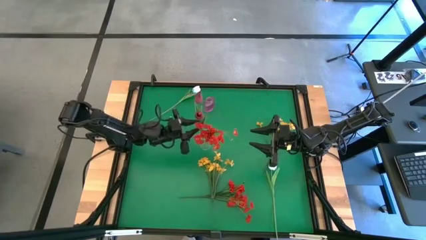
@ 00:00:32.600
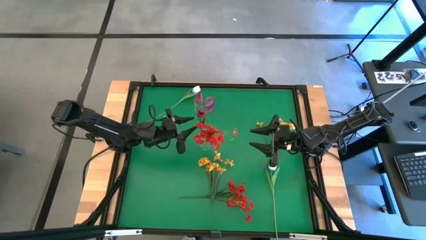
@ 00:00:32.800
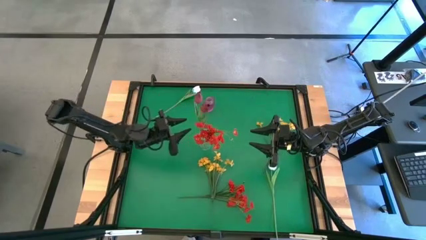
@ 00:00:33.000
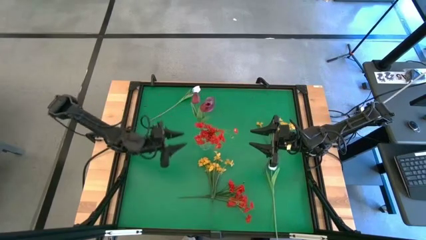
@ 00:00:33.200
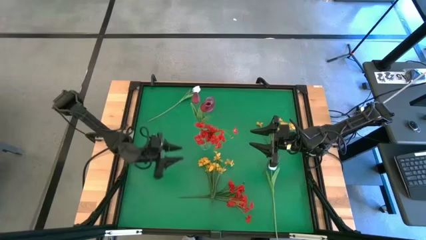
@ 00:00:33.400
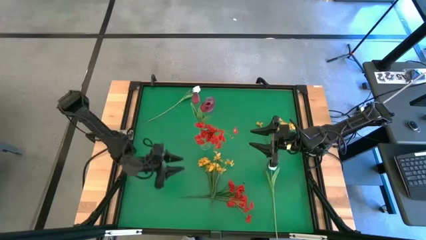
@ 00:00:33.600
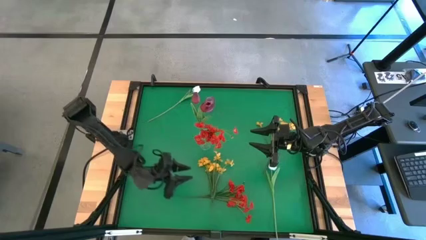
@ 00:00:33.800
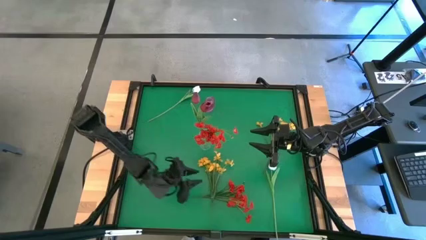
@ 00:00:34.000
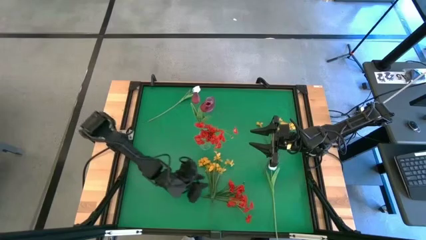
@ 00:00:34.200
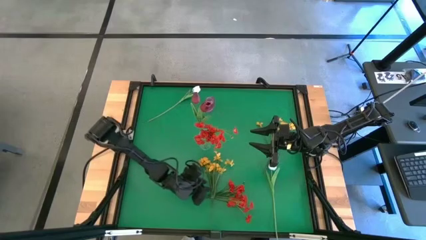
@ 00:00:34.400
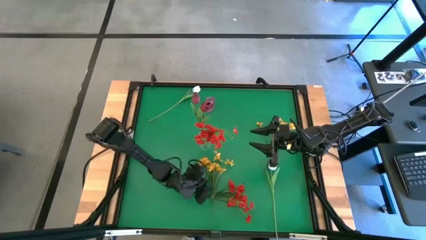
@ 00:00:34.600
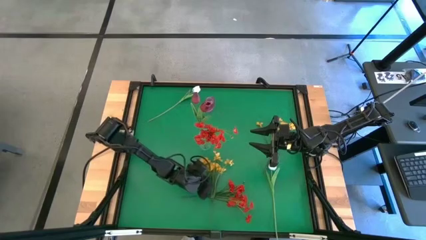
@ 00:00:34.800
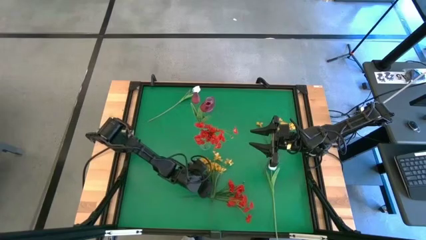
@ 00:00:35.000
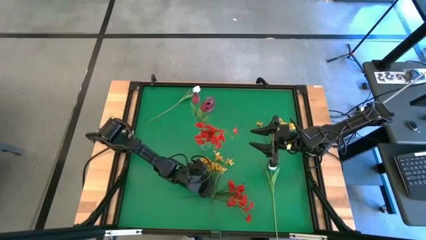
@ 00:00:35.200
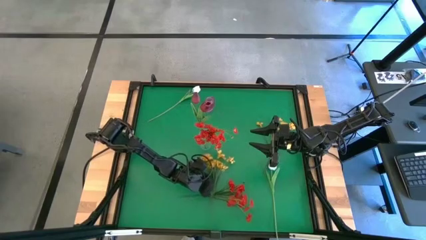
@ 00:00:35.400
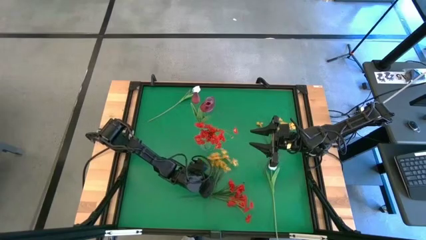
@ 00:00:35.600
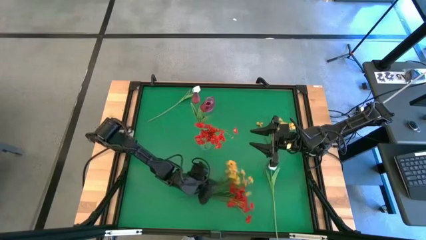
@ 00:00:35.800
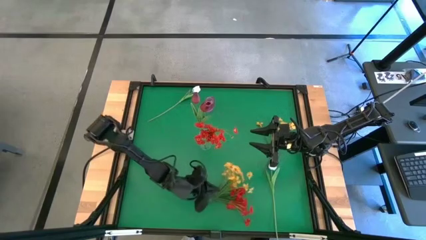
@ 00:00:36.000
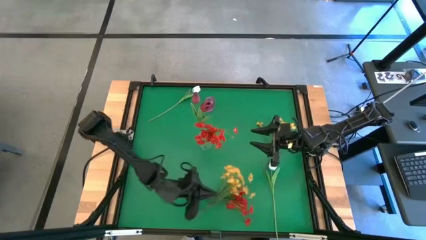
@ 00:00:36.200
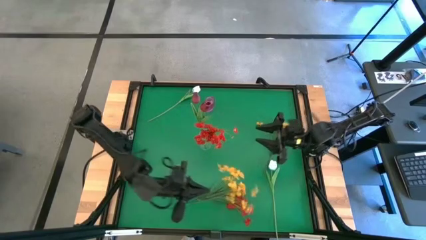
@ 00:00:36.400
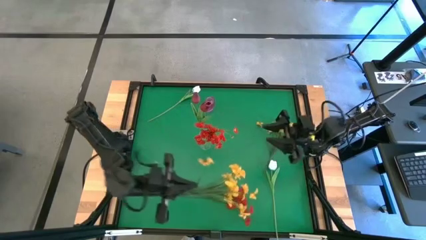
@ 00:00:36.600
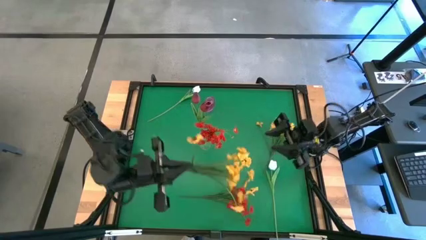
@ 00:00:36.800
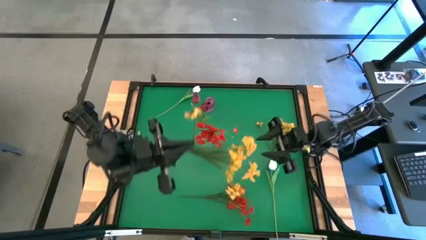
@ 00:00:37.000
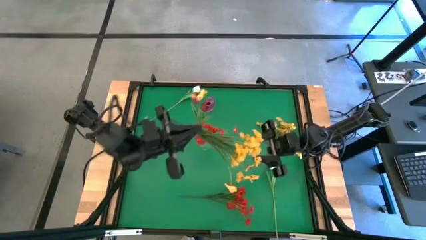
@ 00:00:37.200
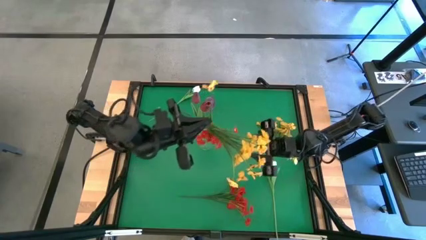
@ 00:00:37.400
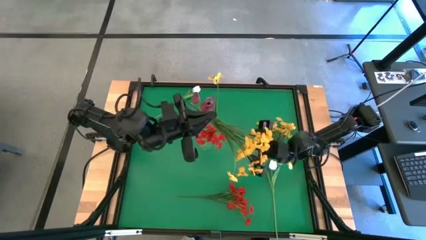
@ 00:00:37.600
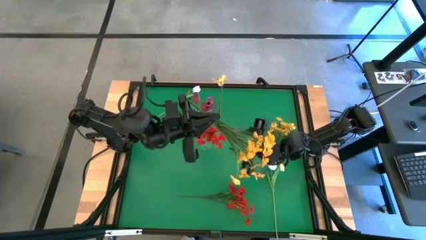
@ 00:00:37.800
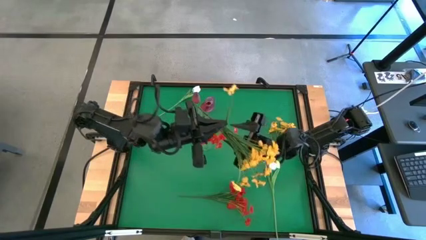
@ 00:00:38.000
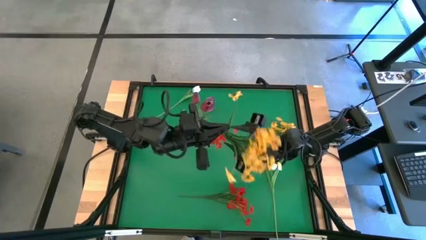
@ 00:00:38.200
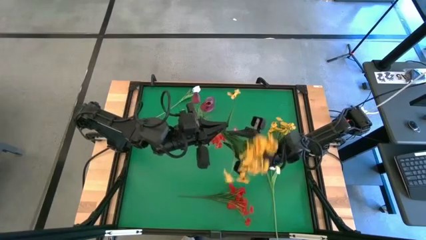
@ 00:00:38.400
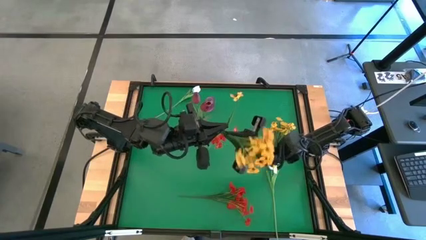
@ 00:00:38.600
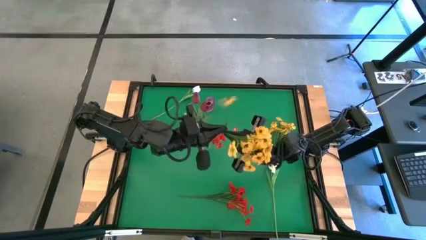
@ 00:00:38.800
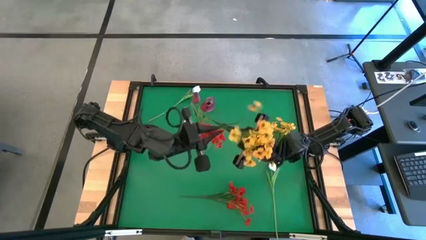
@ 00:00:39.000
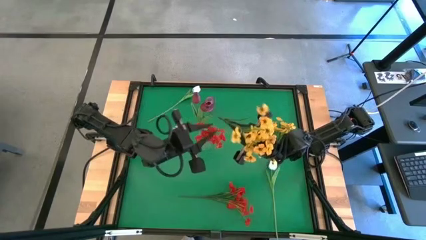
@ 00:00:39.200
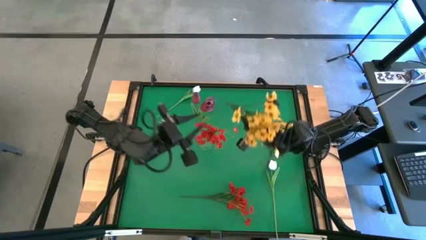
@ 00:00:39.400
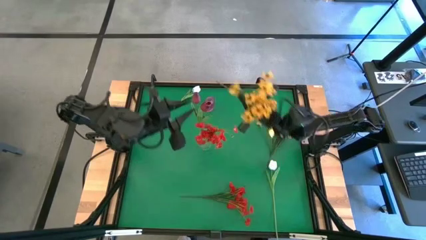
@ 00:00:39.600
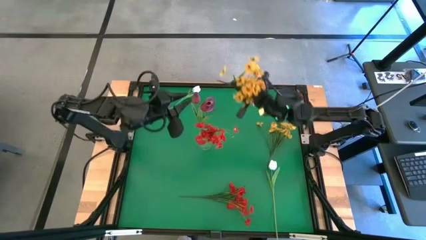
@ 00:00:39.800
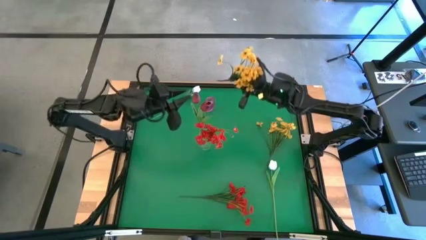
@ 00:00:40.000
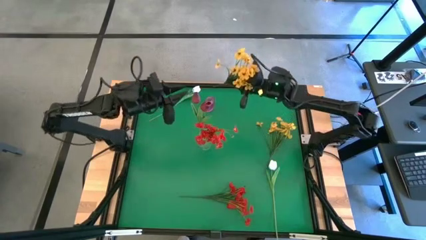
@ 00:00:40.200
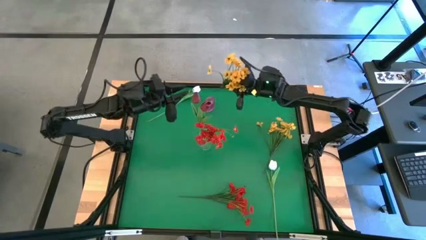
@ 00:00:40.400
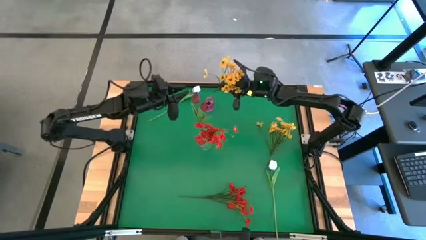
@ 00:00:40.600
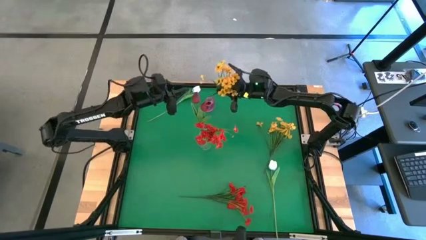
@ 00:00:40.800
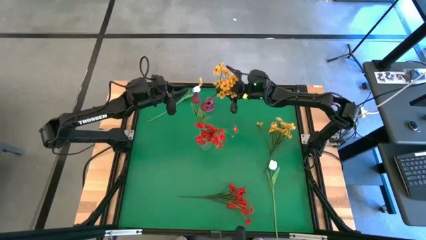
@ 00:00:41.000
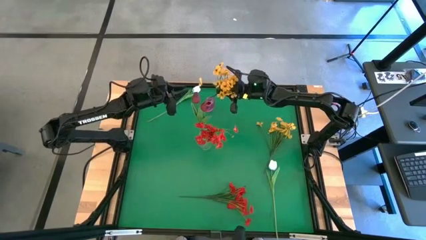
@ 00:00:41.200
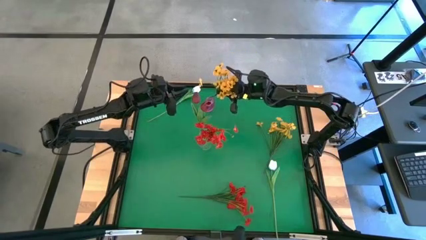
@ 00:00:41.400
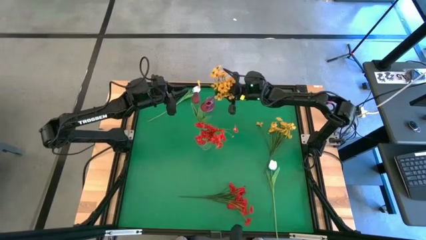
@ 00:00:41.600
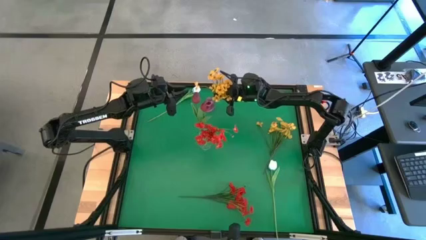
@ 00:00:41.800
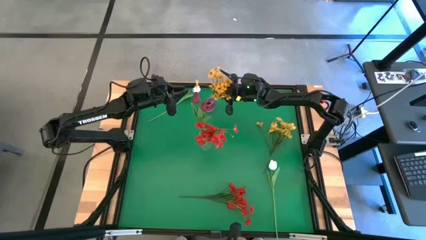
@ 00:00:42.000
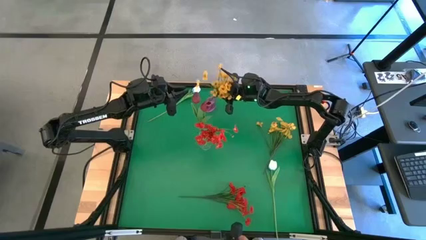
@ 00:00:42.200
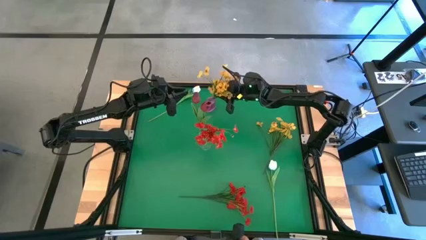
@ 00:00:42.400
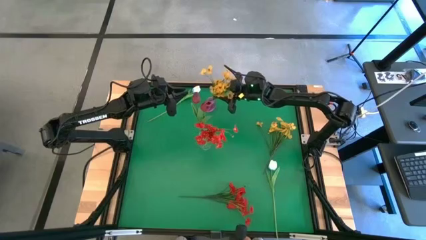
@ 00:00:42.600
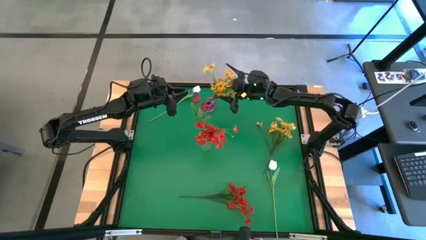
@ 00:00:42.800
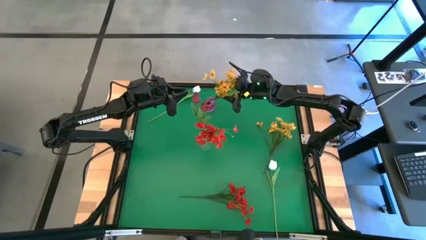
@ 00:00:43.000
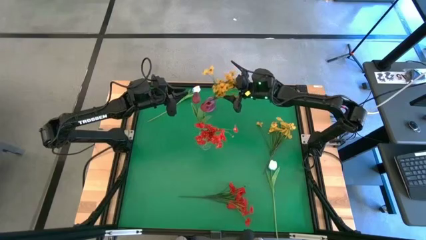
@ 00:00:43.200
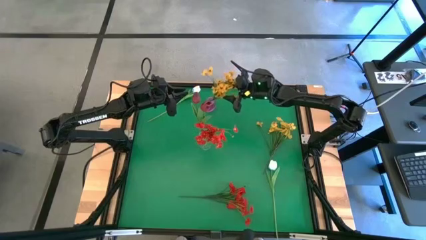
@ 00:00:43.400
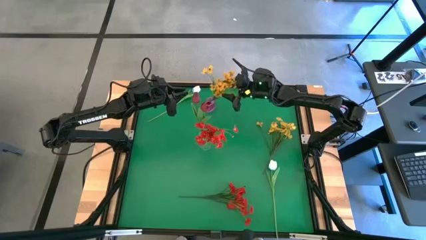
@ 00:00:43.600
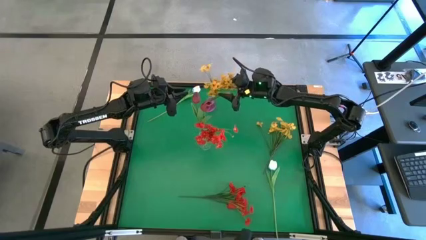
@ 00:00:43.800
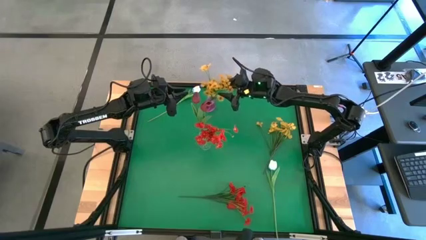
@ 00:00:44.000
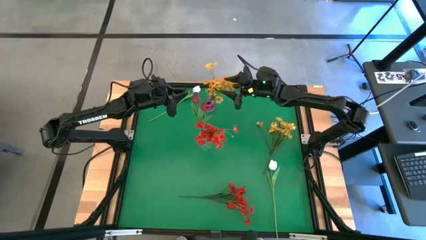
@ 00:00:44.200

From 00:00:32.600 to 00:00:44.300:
Task: Sort flowers into vase by color
Put the left yellow flowers into the pink transparent vase
